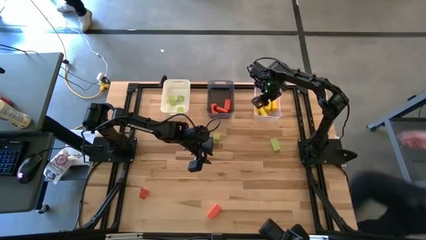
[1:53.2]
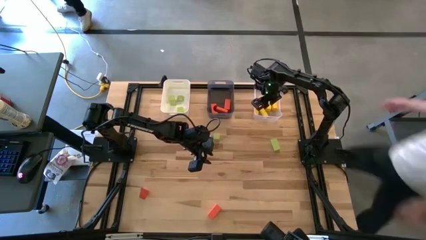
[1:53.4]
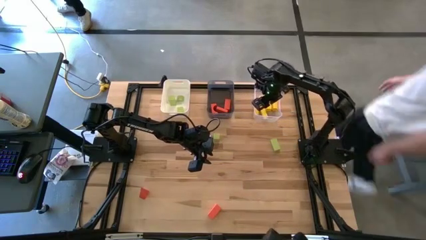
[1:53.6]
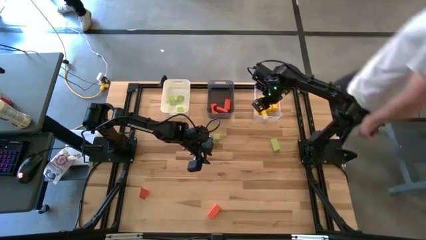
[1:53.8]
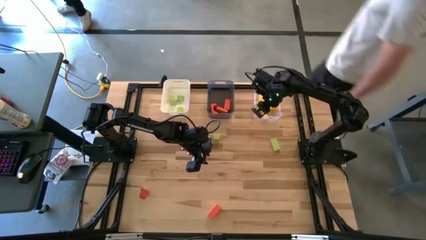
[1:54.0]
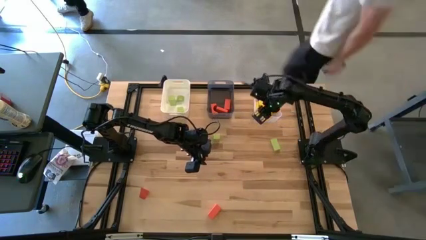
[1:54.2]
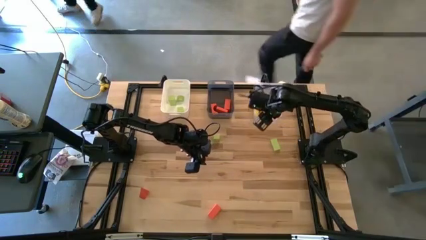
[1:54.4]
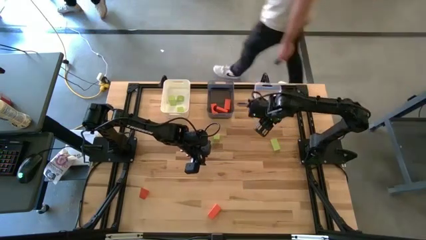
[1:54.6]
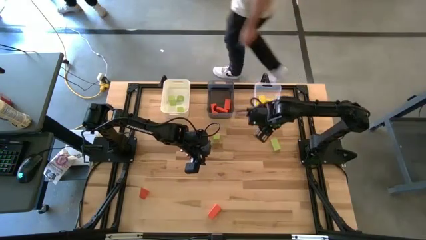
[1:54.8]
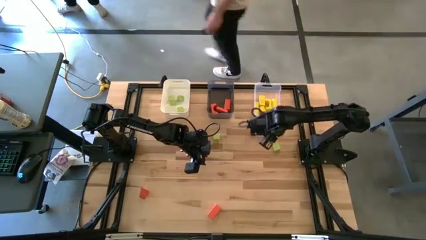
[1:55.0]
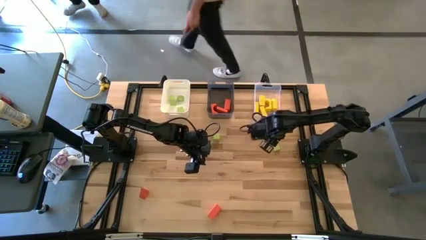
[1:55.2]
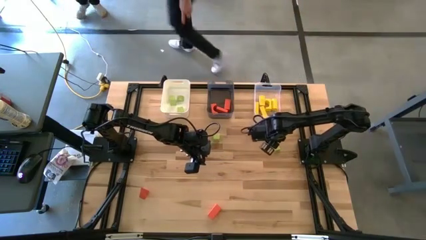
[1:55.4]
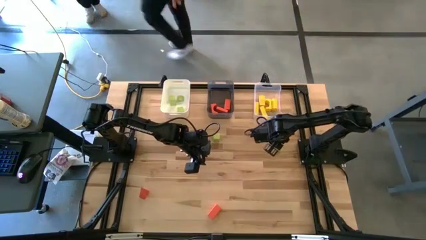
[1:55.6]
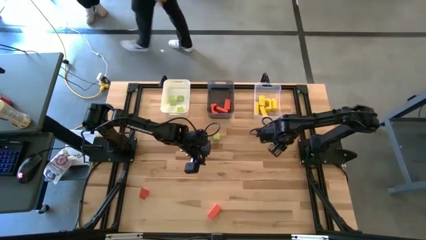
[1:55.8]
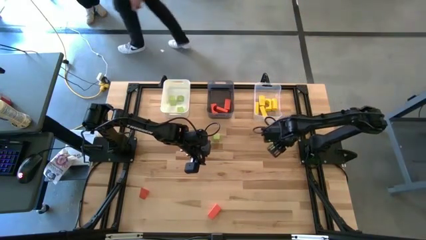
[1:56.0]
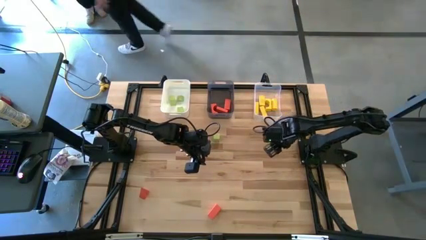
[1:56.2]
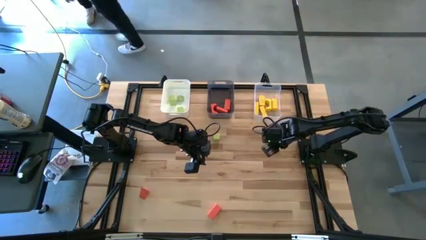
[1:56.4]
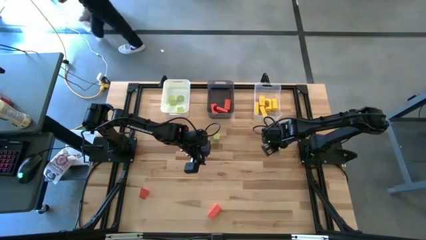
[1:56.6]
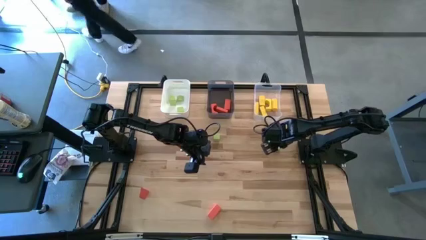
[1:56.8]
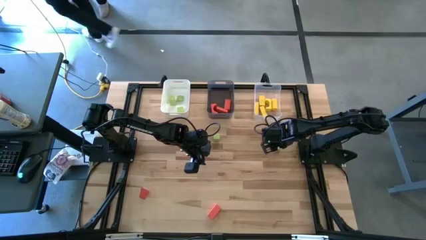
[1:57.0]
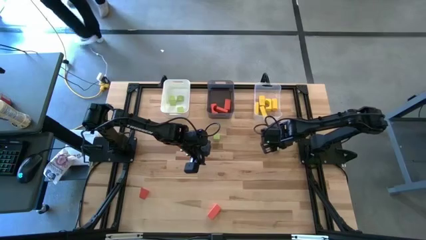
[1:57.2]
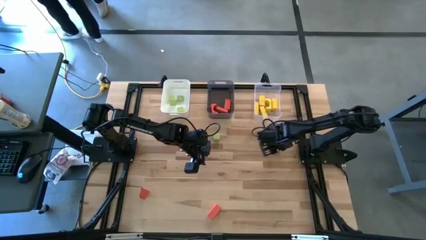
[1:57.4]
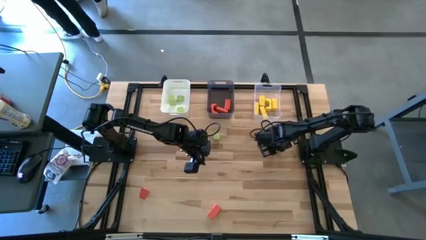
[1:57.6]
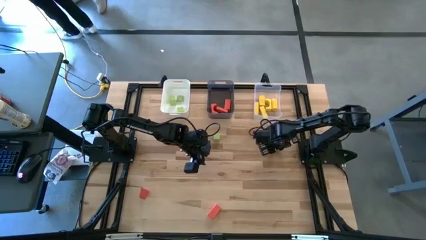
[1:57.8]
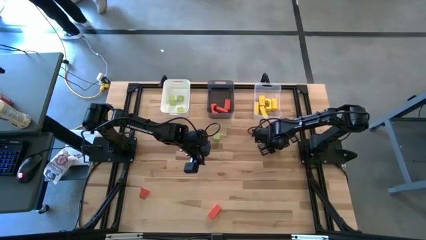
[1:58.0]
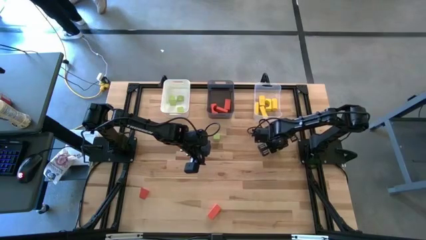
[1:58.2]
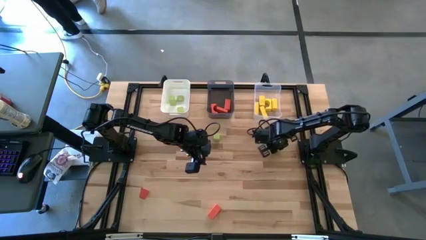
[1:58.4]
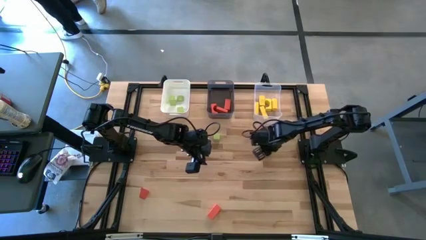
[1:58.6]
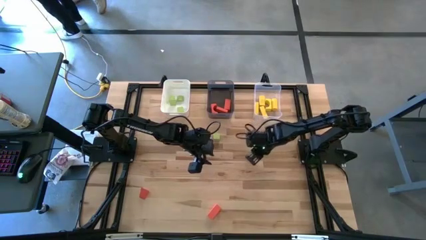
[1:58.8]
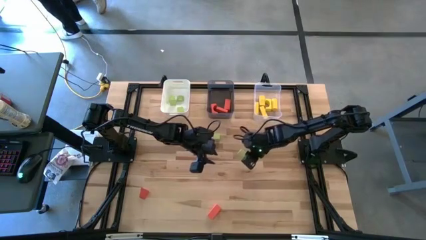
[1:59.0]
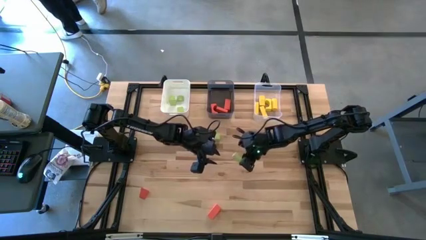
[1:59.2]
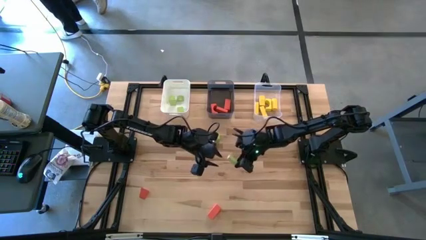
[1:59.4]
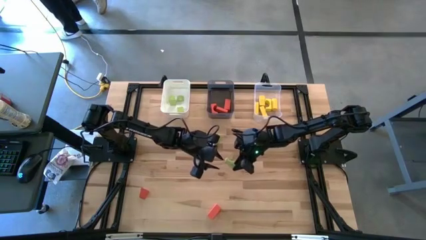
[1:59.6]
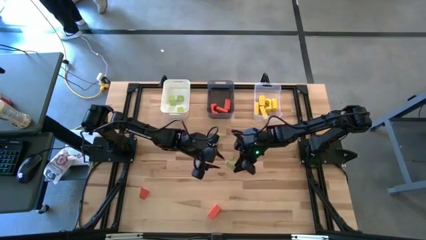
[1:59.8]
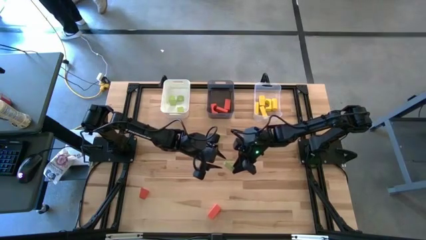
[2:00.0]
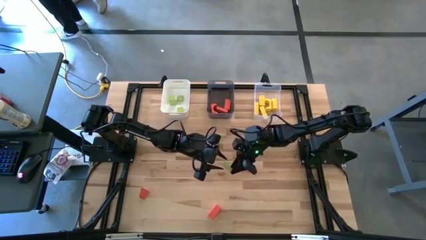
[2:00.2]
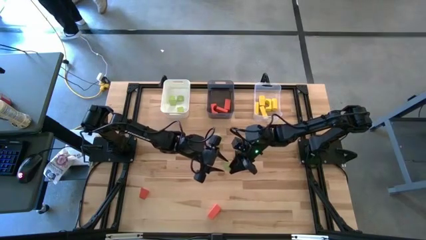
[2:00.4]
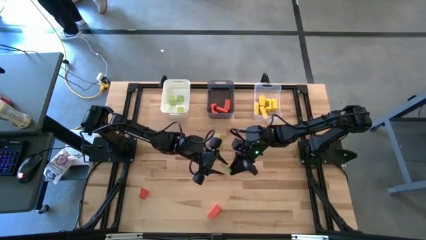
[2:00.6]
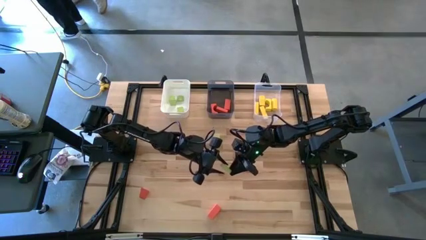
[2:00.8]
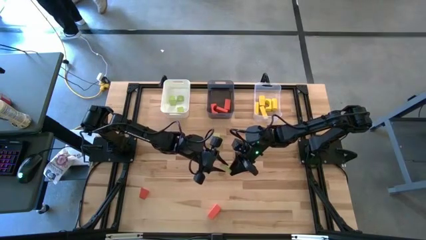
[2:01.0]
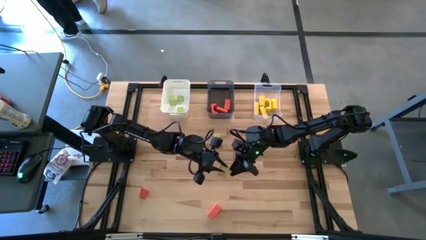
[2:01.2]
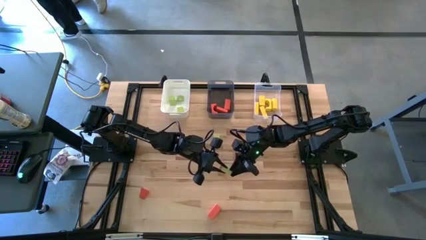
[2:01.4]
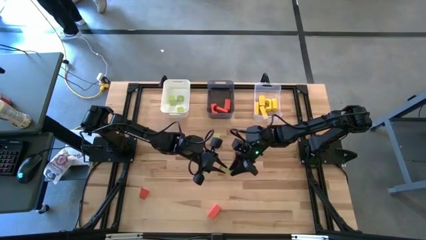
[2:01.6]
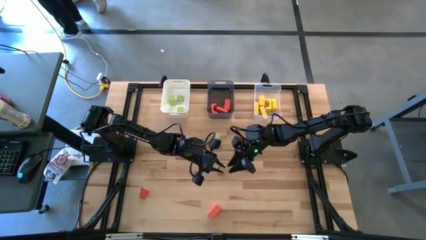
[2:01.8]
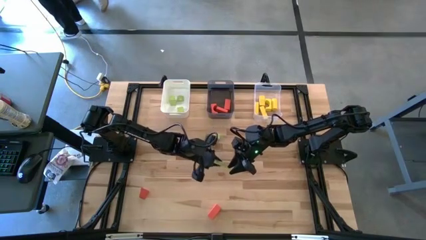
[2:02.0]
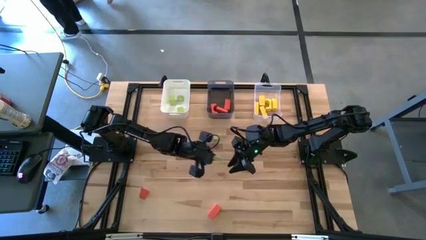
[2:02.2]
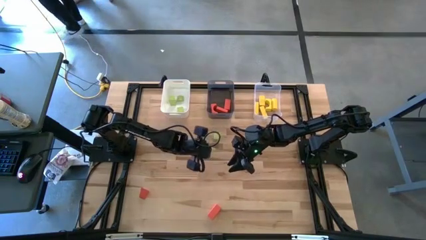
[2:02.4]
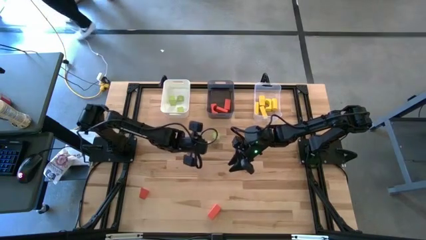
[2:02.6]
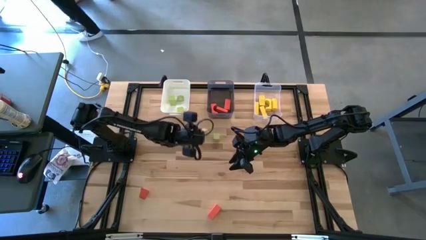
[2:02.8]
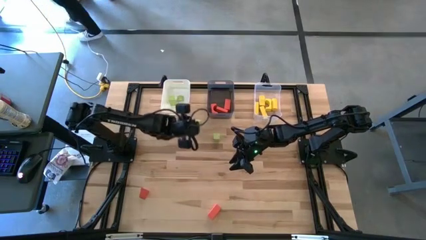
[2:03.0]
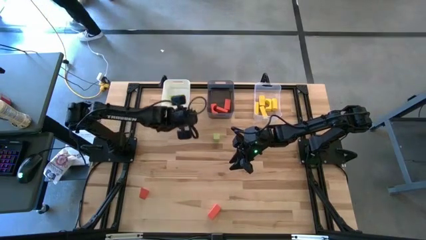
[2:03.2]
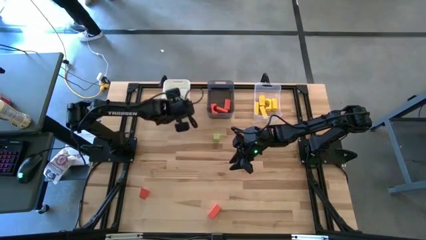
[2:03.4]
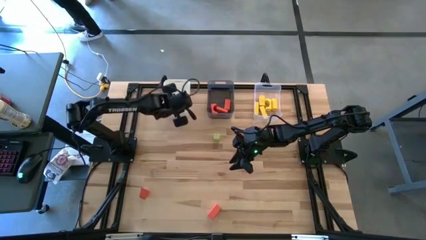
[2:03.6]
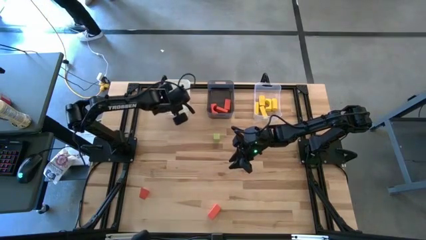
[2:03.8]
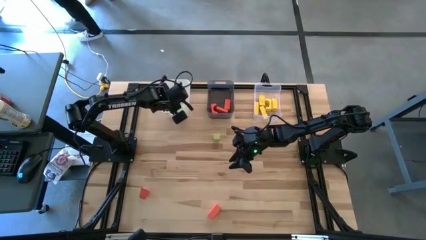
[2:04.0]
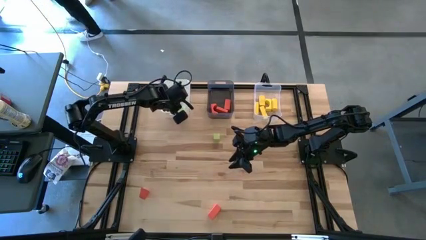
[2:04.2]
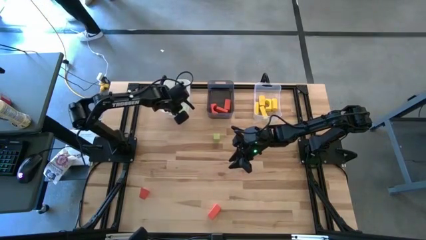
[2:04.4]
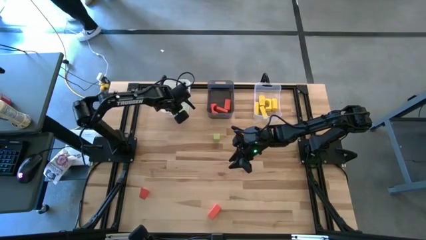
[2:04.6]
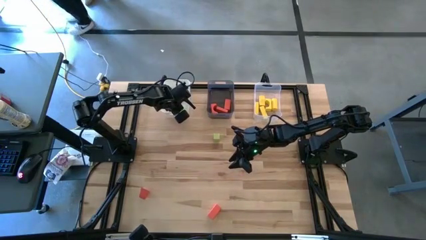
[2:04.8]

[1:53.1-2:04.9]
Task: Sort & place blocks by color
Put the green block into the white bin
